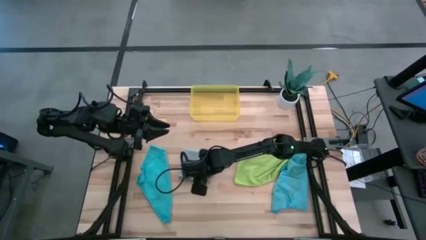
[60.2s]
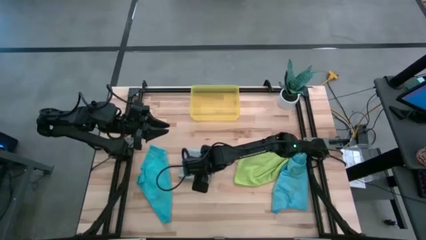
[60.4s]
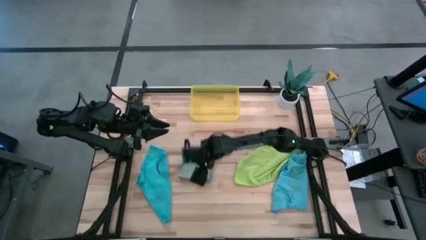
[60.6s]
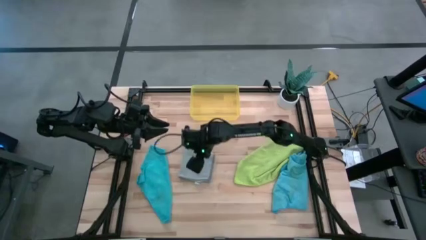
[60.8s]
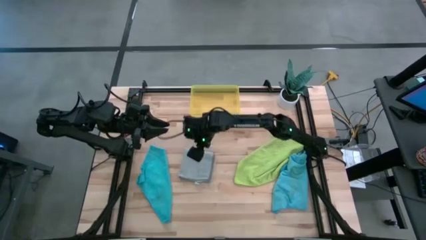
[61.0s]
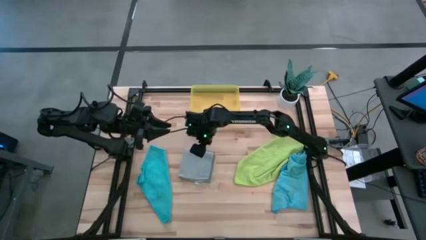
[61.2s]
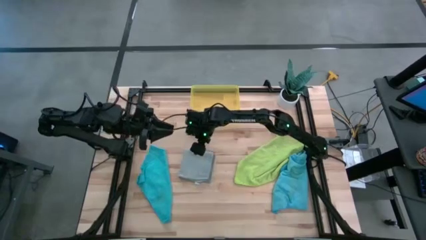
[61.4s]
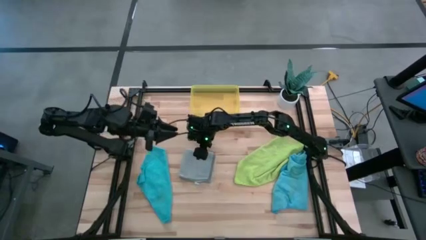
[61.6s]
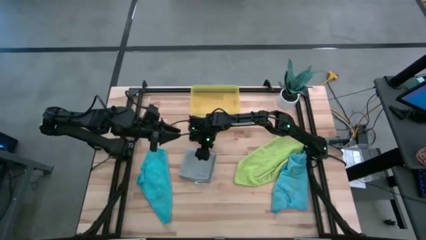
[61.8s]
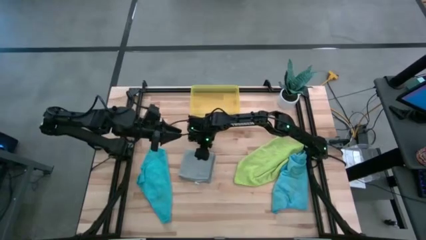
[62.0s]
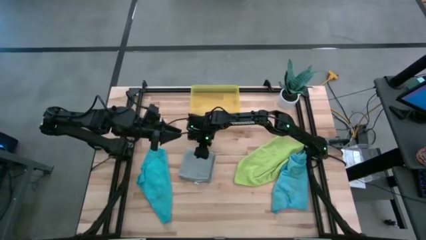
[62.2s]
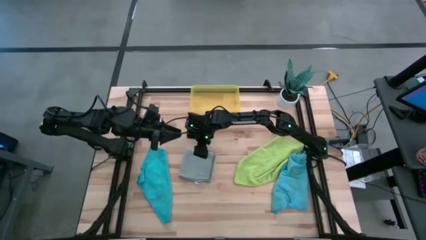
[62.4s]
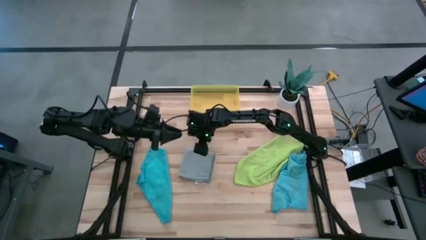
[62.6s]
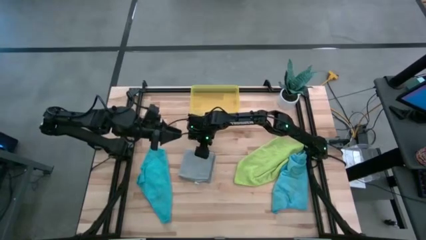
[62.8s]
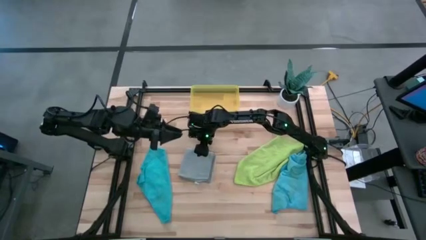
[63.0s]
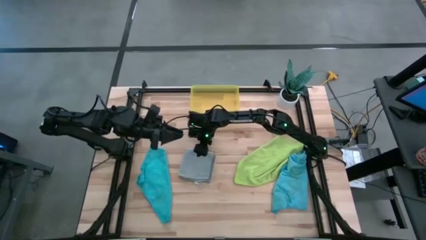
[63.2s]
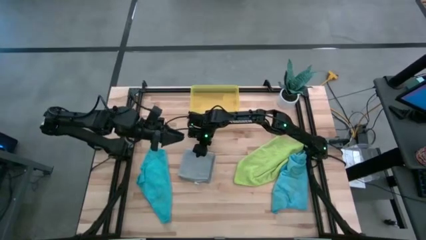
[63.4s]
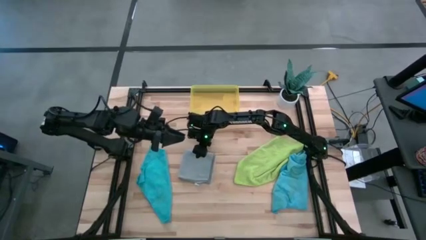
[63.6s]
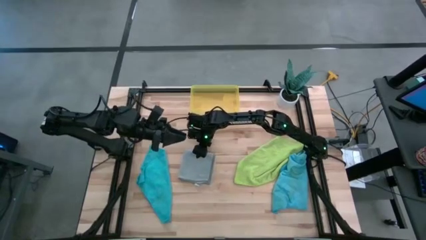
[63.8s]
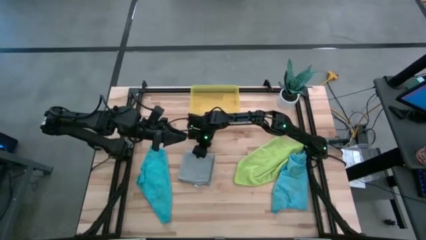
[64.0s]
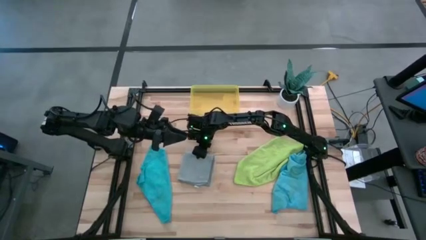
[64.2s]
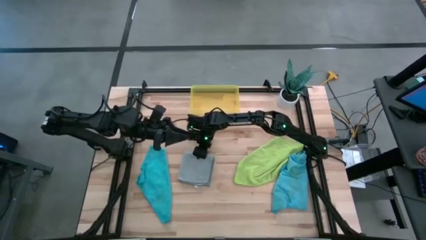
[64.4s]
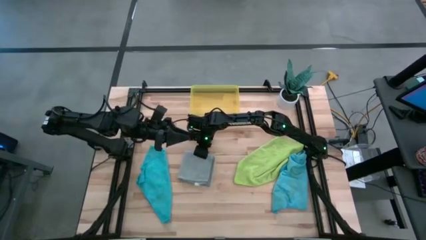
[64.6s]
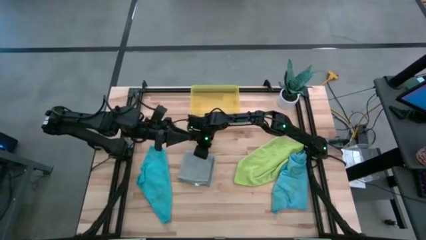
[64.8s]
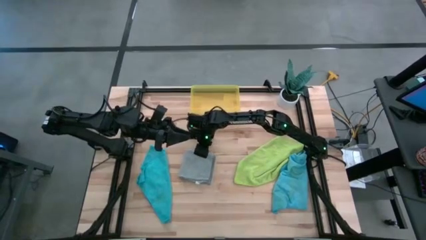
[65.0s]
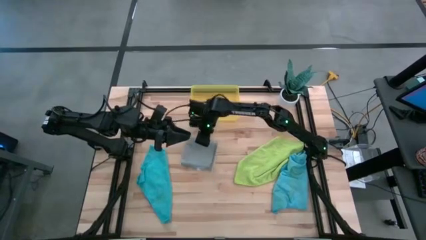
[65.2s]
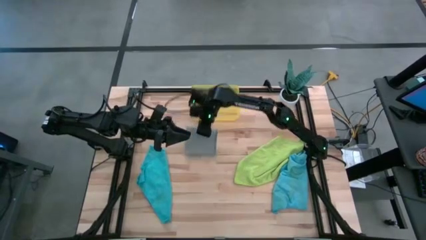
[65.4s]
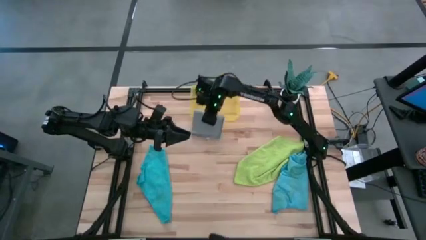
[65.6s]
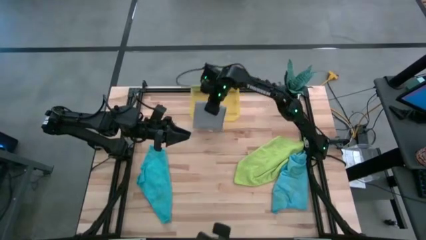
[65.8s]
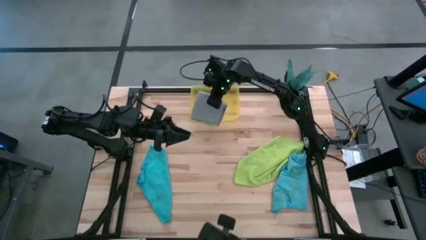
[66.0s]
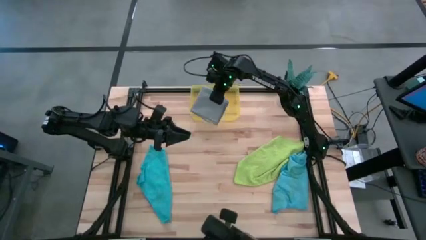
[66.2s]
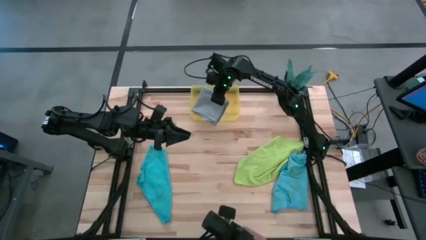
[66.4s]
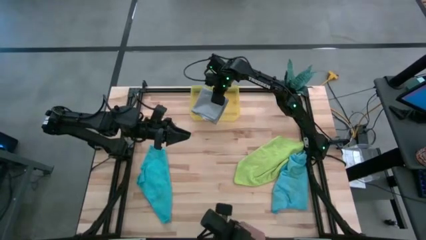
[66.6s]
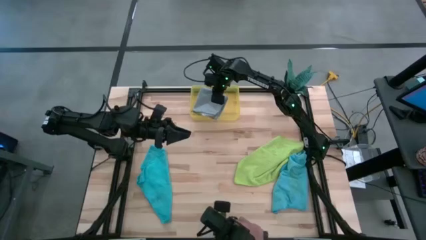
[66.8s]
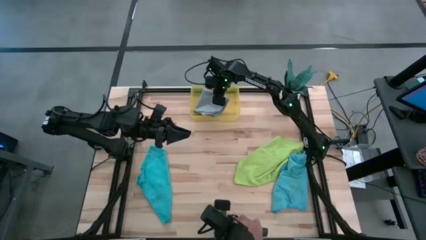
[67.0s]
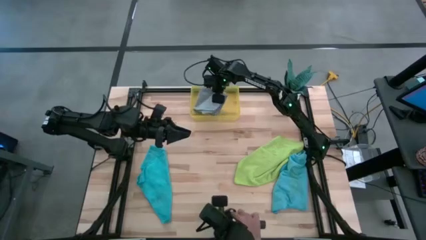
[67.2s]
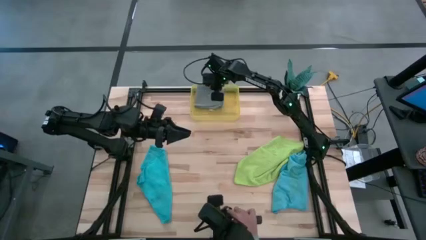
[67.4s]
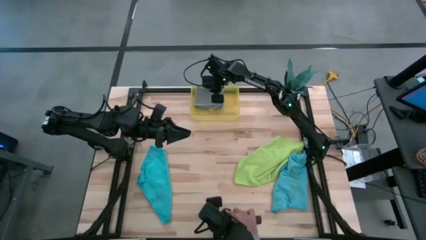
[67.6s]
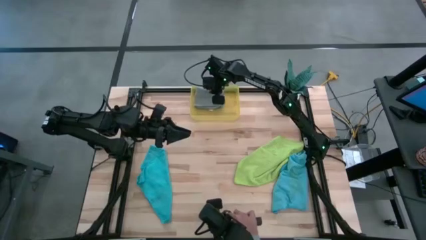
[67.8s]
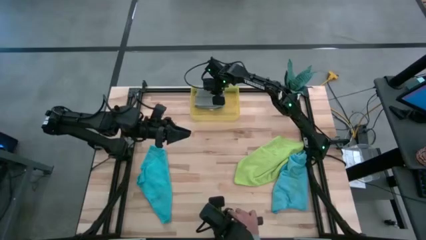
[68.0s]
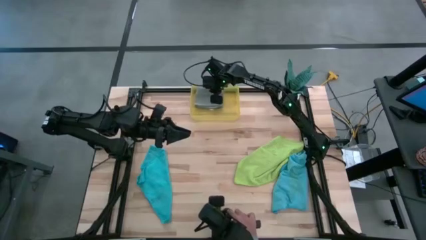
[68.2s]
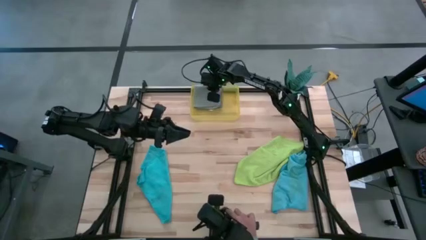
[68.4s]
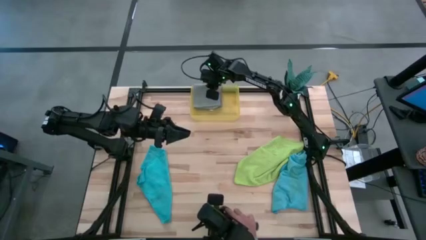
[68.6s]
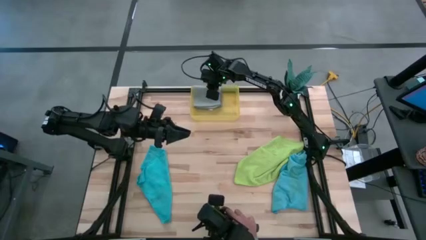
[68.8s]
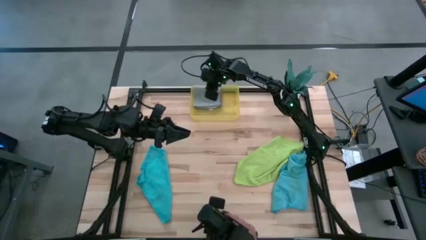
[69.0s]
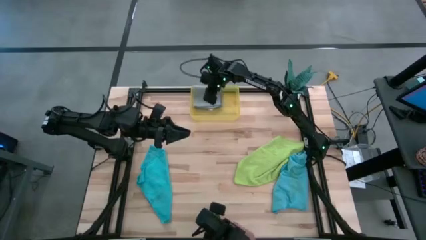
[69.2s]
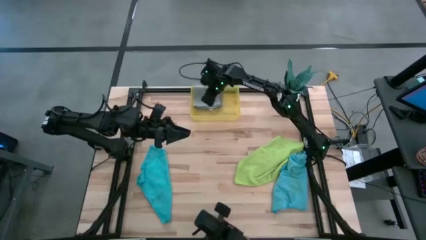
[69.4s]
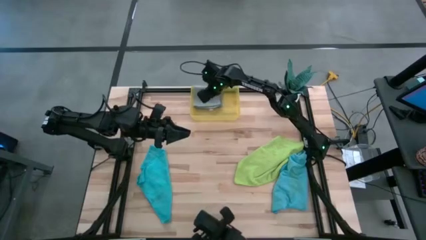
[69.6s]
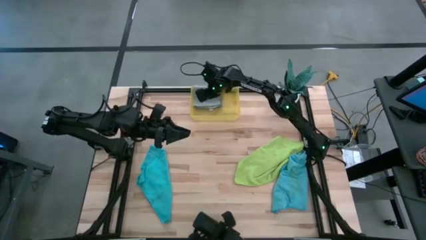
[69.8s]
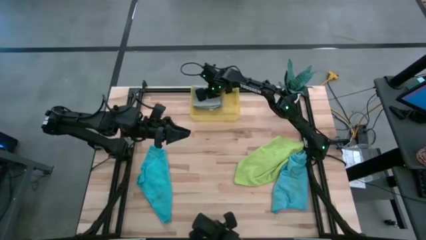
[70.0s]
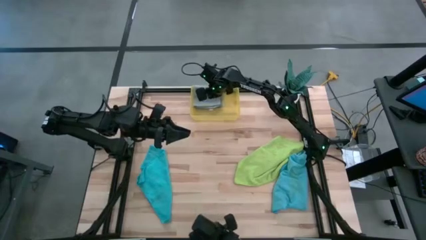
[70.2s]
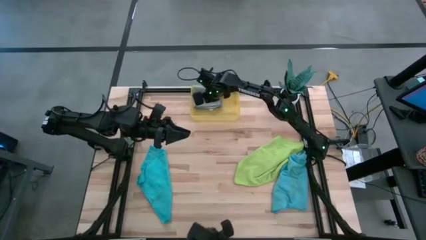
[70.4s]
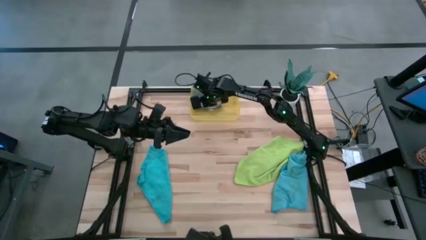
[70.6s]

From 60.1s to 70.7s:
Task: Fold microfiber towels
Put the gray microfiber cloth into the bin

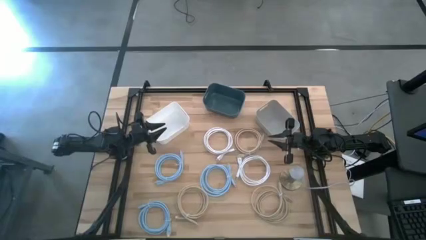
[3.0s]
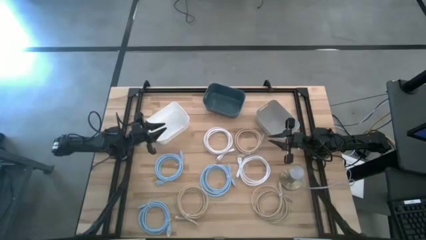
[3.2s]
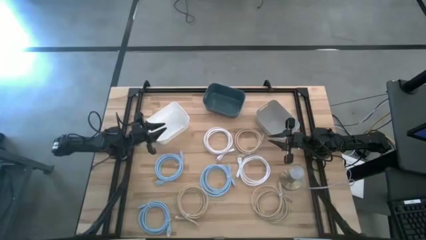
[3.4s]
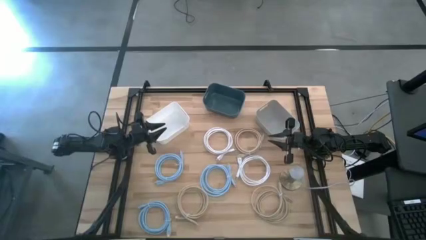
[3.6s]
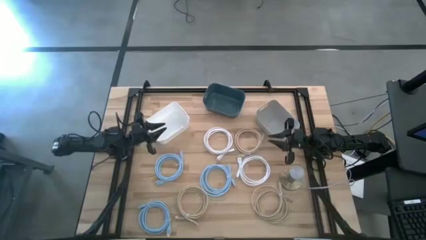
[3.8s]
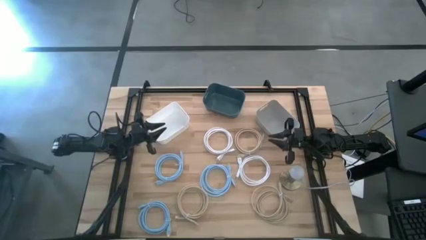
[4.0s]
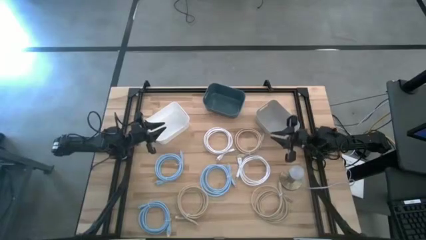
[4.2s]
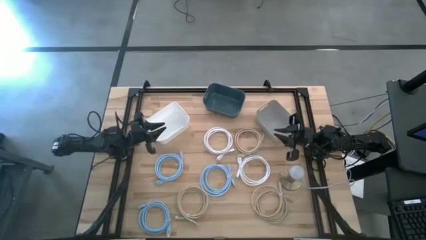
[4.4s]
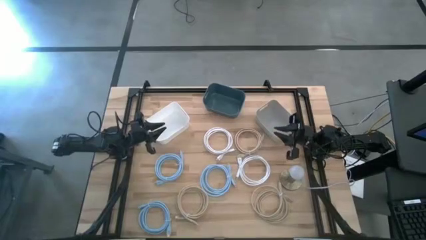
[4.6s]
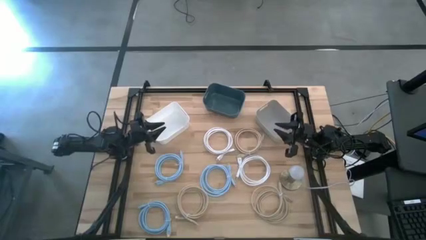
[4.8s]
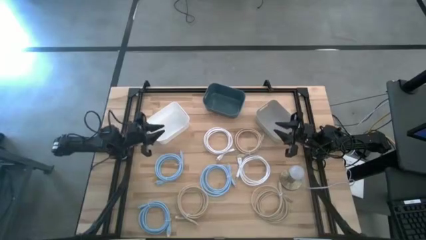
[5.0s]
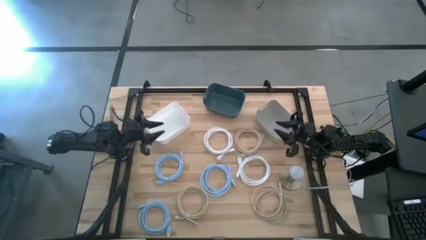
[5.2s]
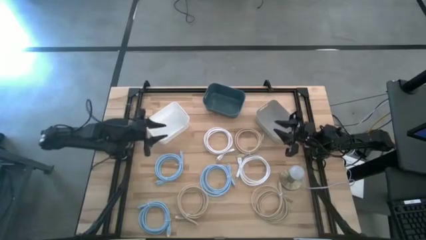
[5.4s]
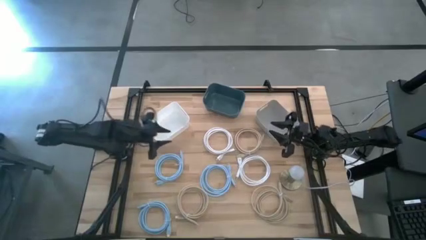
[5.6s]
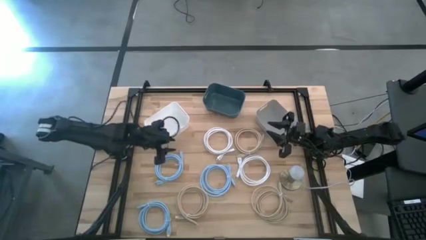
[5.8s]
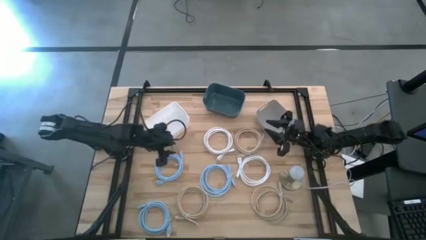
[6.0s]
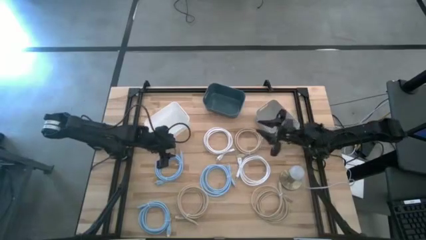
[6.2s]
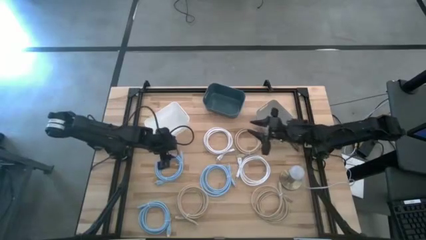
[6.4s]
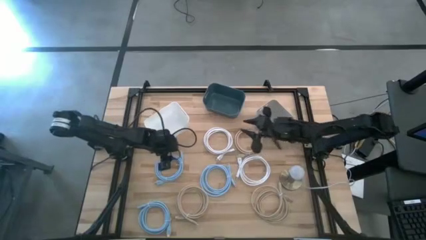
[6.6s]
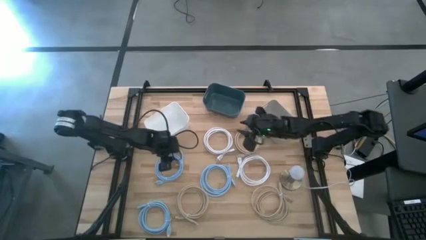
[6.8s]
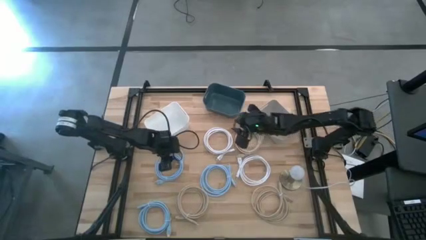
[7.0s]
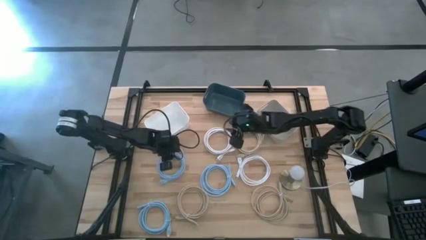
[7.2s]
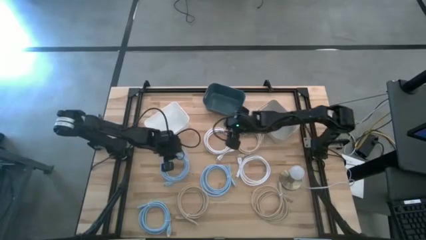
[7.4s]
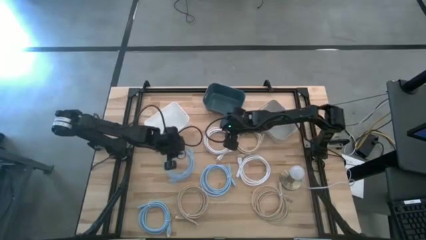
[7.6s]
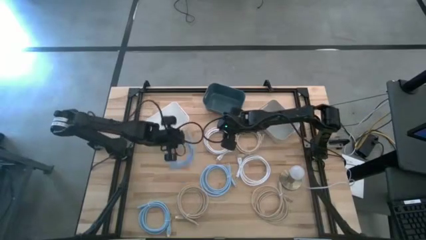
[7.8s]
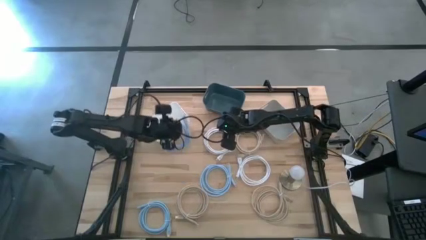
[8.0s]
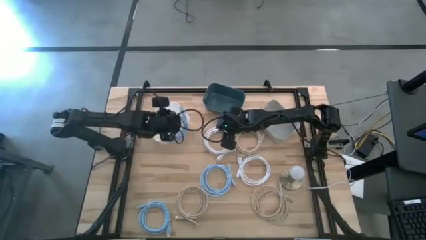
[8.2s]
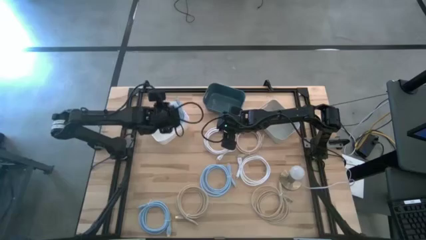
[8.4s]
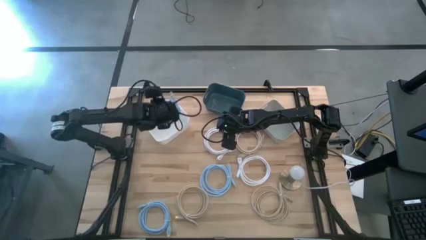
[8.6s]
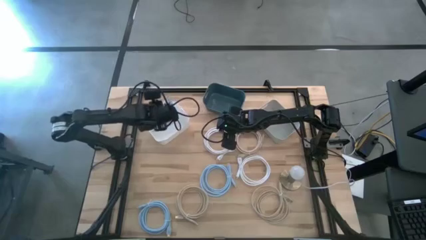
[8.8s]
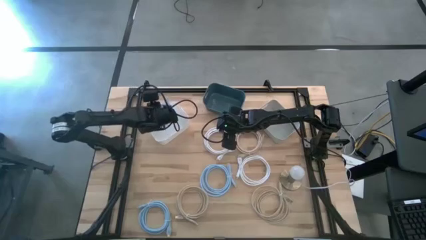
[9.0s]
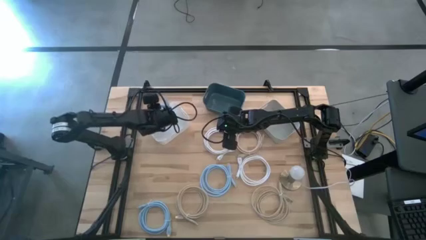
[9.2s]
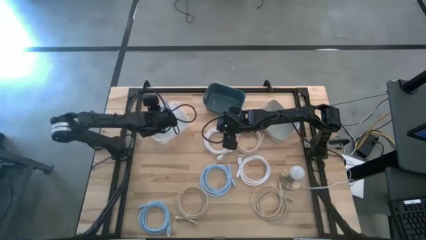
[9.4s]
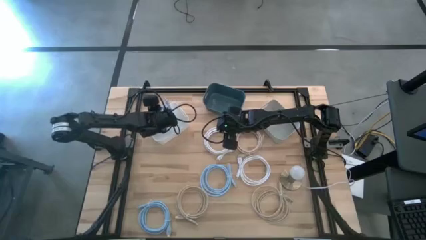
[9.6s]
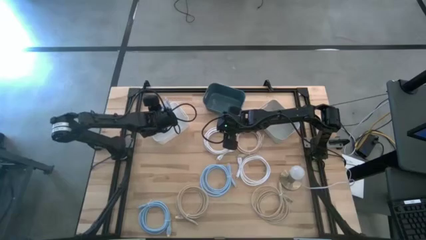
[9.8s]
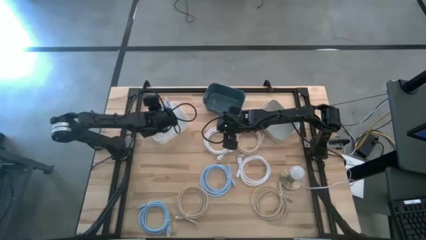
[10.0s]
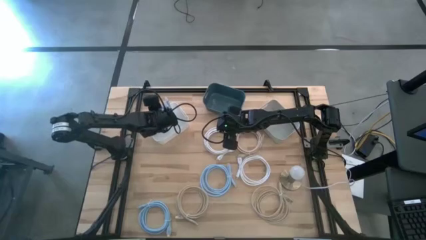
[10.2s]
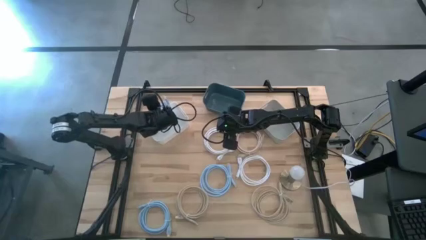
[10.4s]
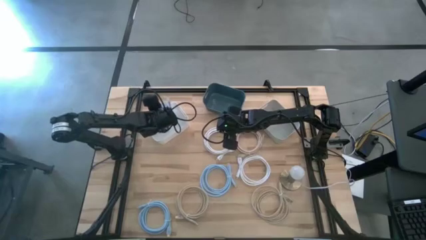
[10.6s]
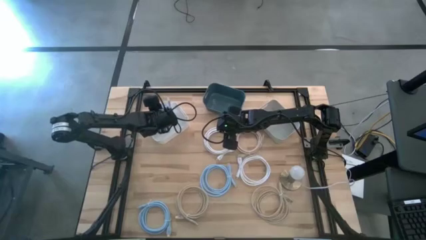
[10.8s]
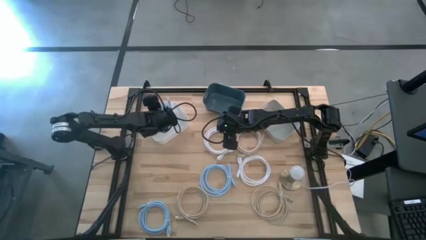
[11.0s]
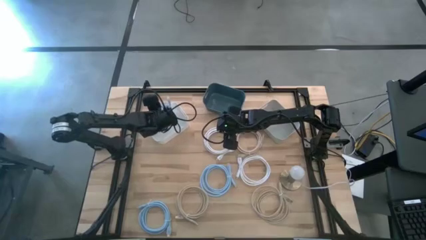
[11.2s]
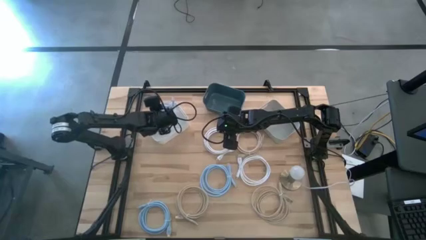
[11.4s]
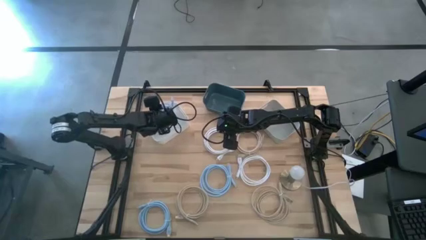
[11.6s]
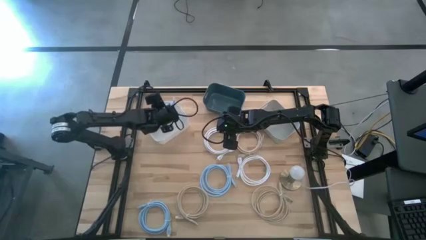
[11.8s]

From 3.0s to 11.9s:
Task: Pick & Place USB Port
Put the top left blue usb cable into the white bin
